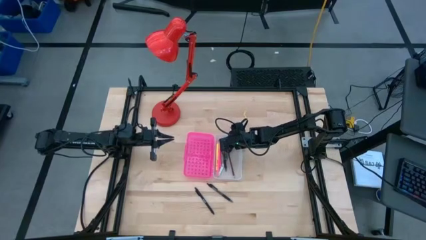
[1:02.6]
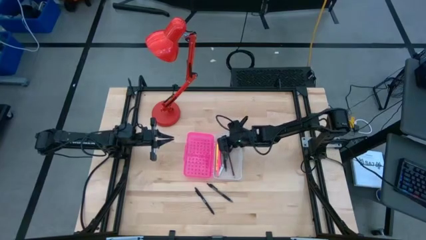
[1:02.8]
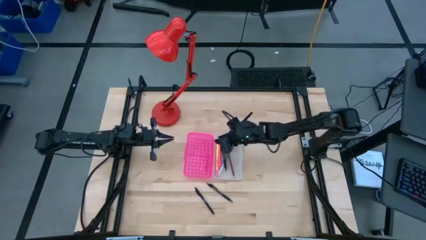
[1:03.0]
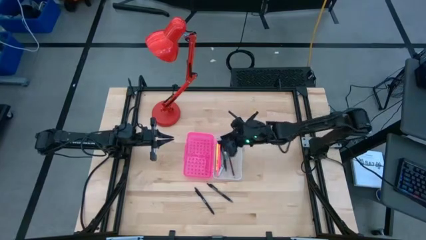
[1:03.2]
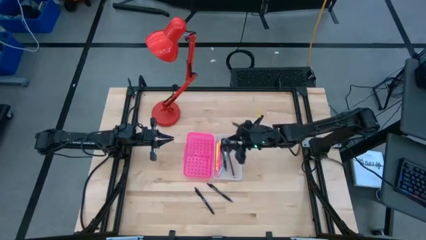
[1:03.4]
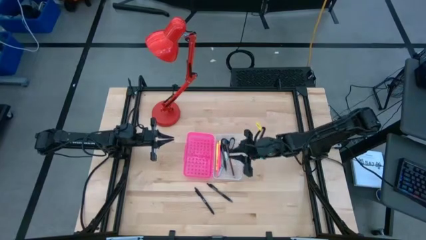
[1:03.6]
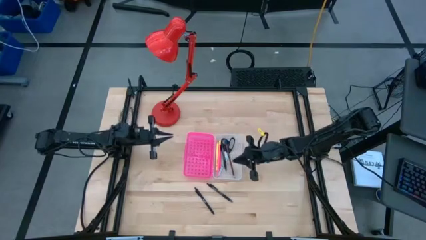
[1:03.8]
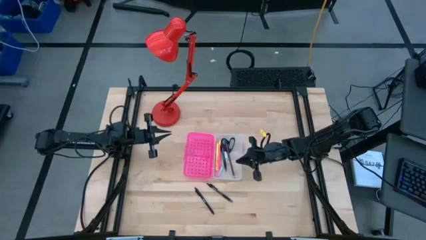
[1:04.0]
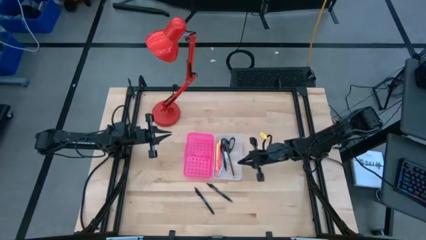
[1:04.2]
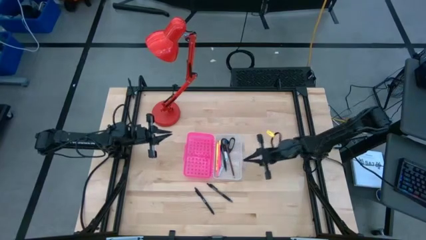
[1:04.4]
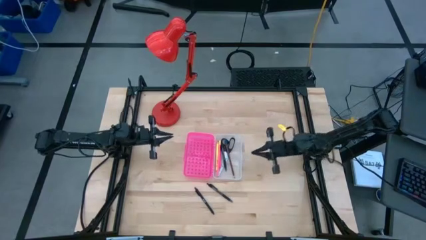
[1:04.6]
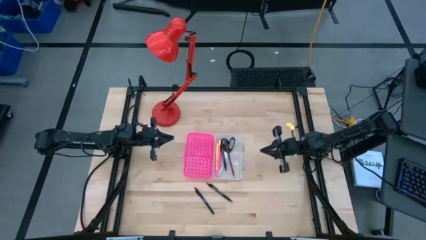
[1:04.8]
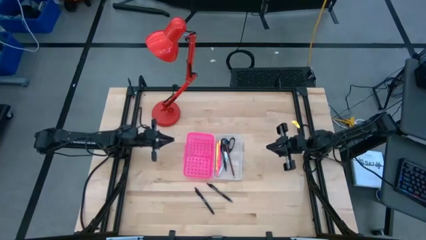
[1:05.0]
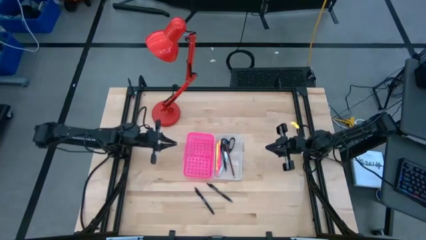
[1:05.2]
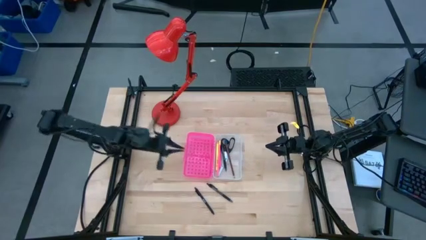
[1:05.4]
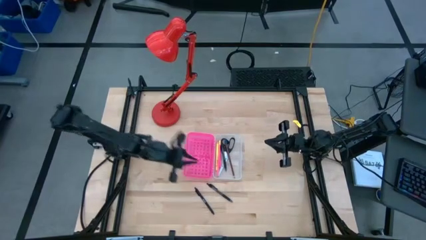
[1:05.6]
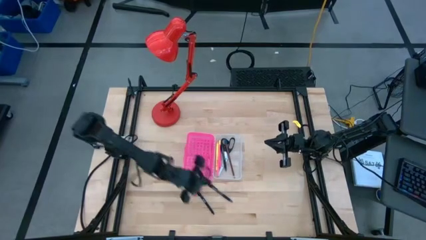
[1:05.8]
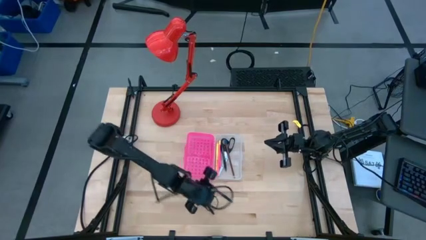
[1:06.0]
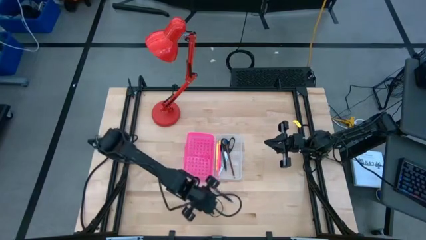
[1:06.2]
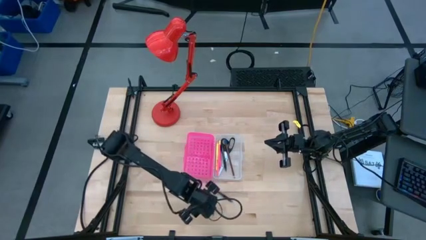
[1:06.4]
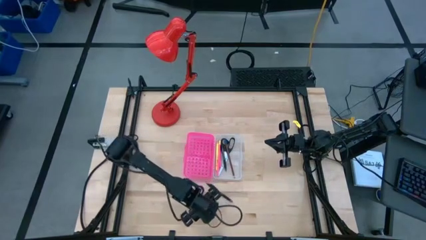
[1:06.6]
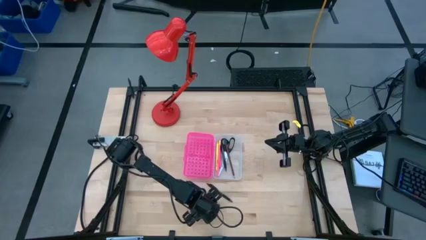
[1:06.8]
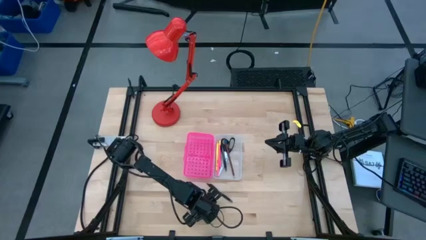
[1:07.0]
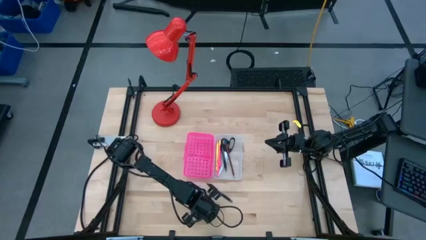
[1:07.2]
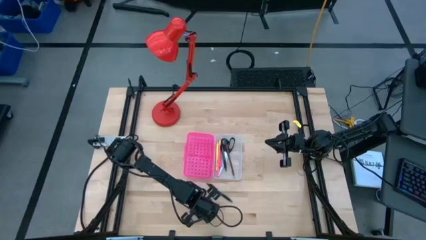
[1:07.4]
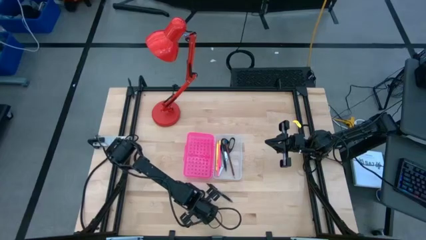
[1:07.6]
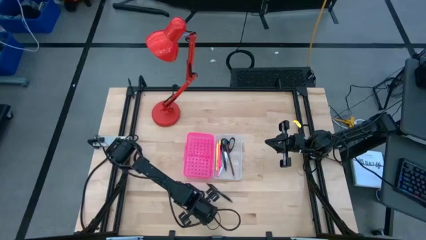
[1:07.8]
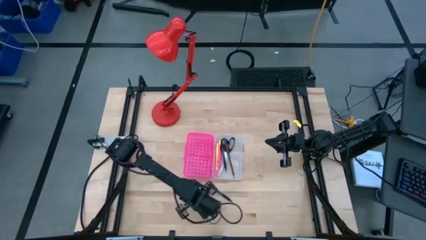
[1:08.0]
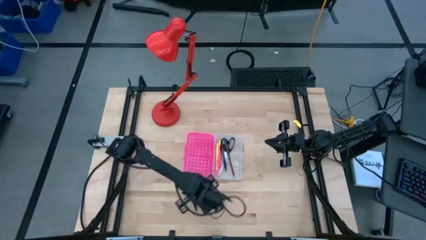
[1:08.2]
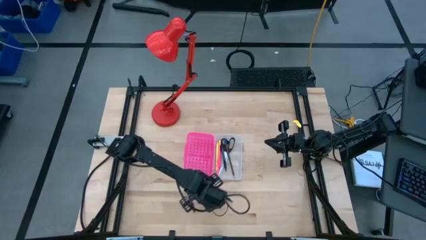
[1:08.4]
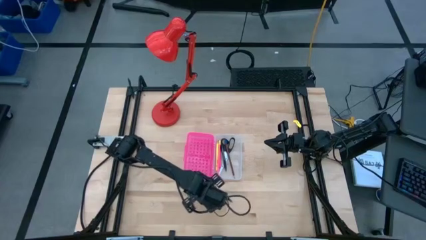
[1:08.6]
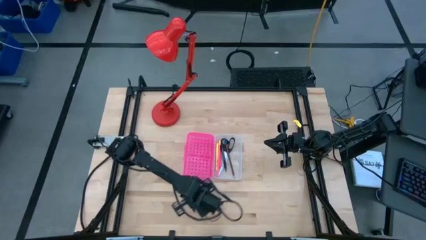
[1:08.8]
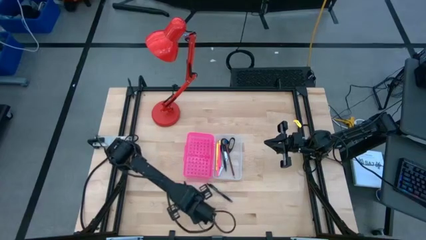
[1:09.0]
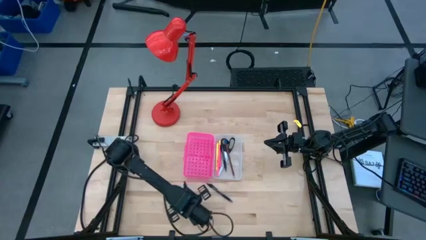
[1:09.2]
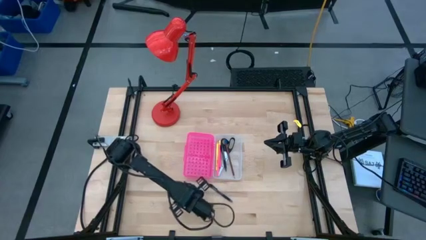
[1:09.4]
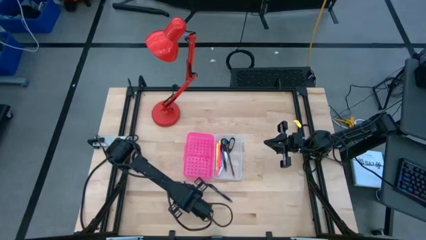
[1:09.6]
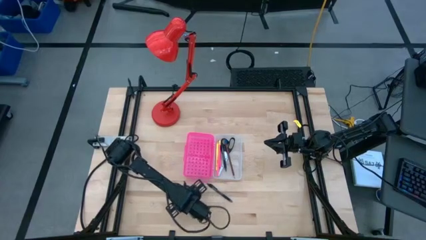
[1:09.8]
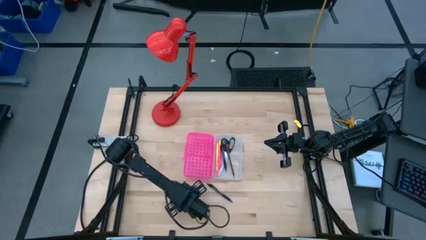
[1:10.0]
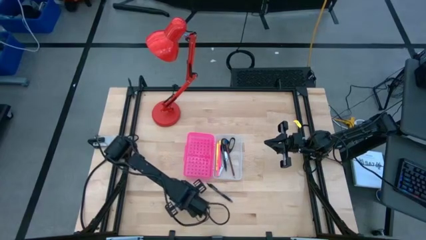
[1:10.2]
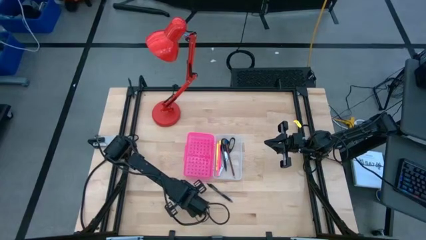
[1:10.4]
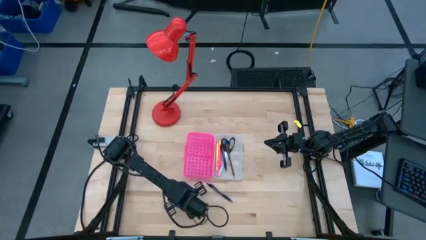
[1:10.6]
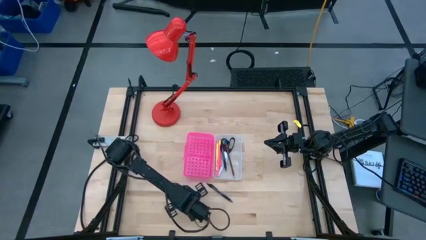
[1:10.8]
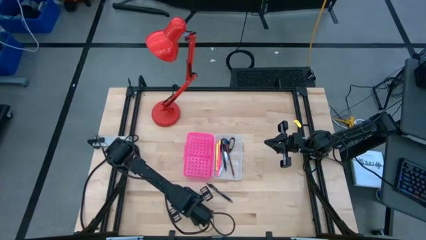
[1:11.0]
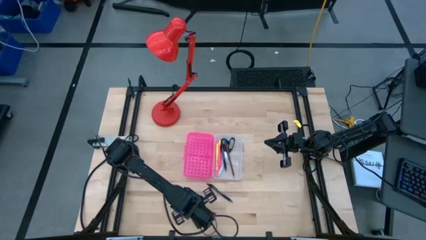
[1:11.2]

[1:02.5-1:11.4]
Task: Pick & place school supplies into a supply box
Put the right black pen into the pink supply box

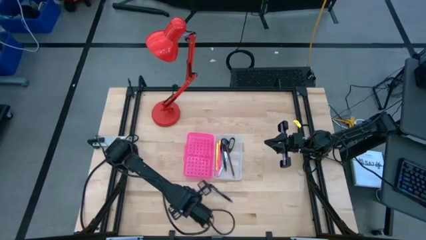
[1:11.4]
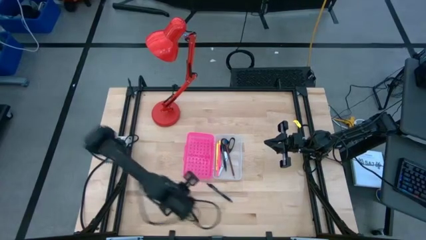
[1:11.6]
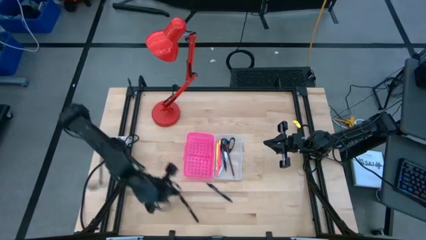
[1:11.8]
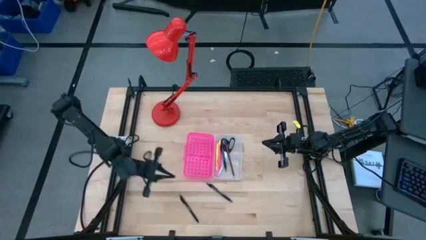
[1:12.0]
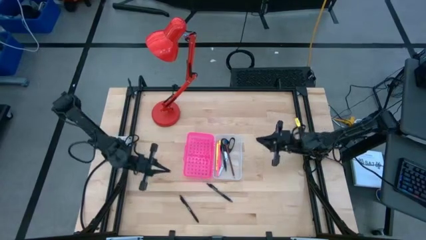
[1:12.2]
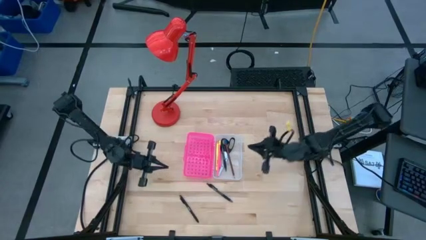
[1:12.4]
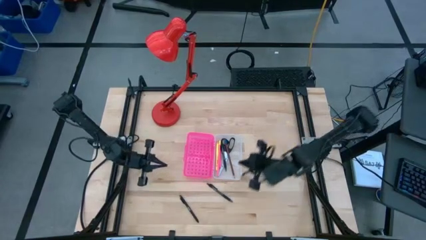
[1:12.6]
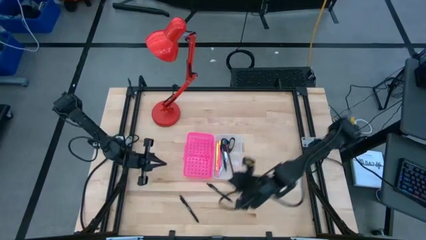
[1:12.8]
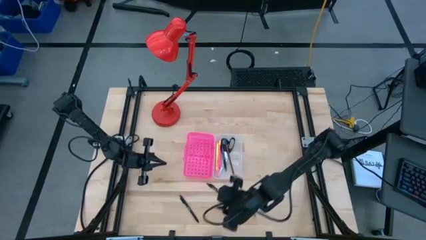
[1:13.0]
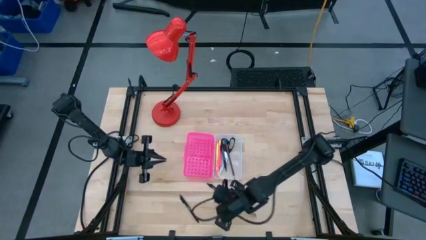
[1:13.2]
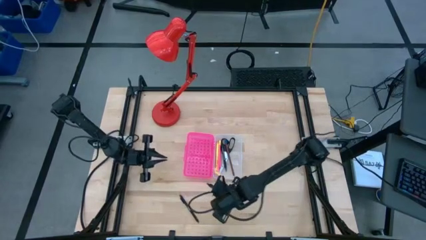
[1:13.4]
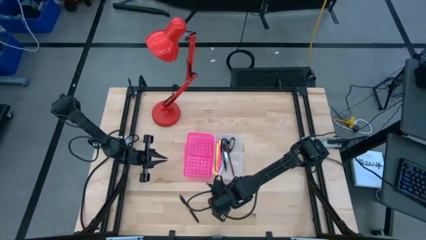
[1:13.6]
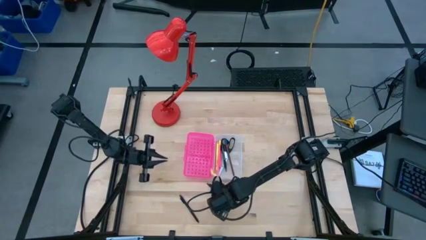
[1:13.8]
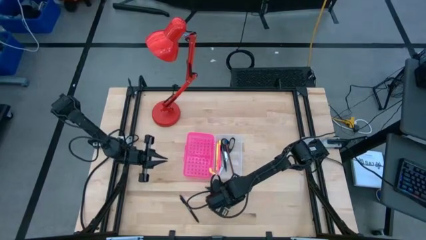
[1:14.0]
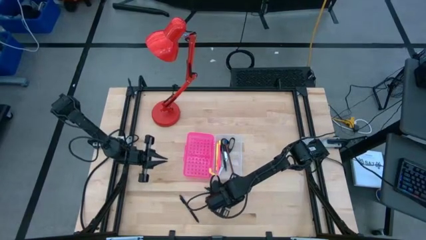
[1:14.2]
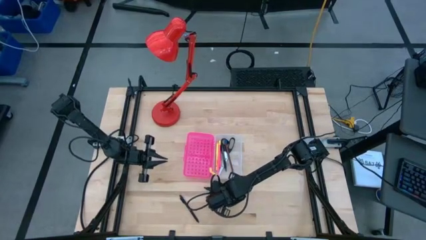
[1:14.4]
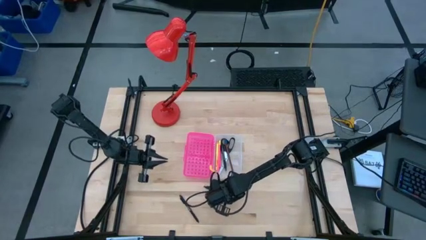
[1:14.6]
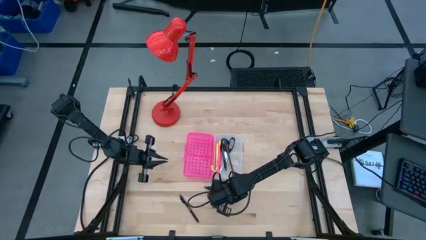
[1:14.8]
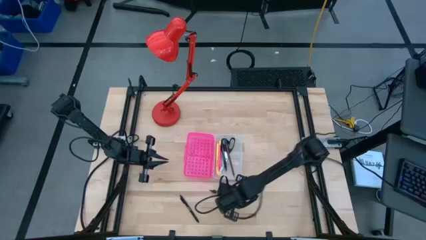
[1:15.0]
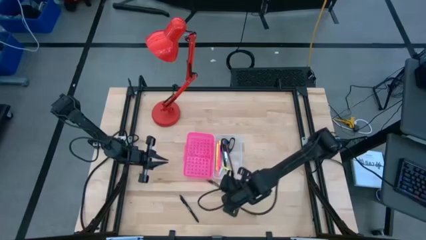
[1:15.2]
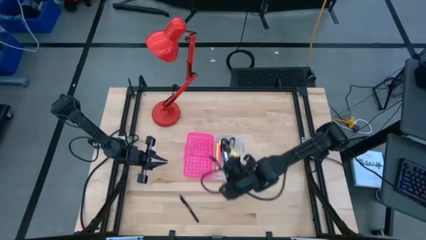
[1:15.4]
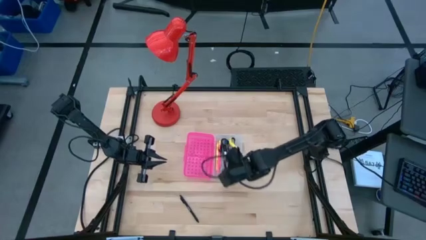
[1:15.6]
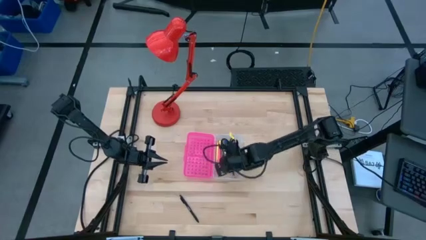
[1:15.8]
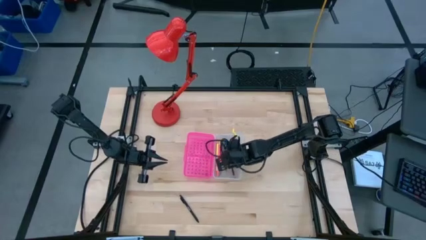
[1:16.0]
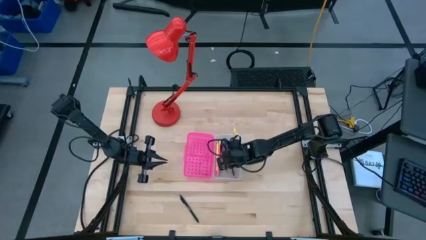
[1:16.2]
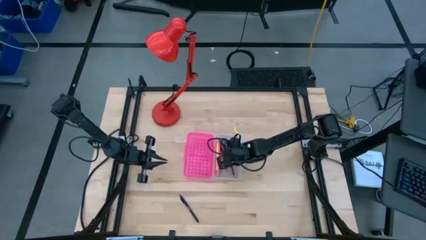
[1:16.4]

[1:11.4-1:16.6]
Put the right black pen into the pink supply box
